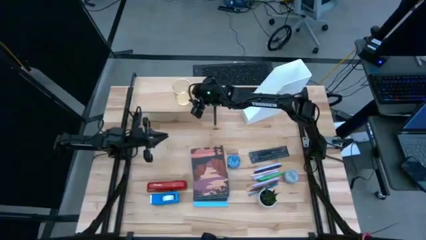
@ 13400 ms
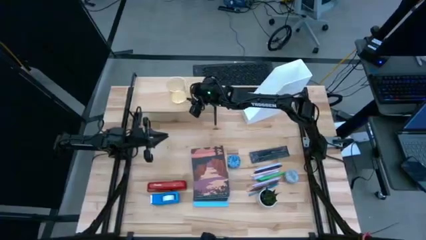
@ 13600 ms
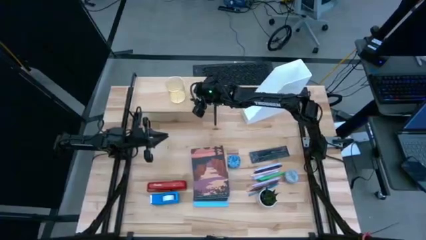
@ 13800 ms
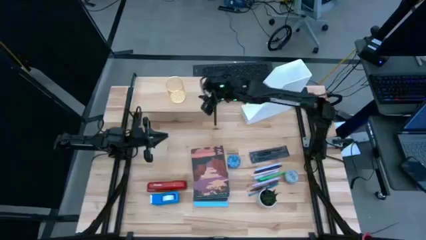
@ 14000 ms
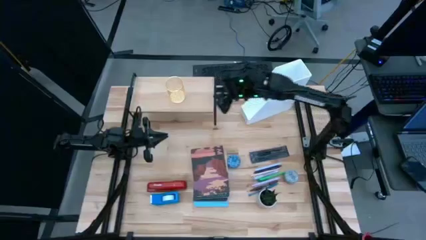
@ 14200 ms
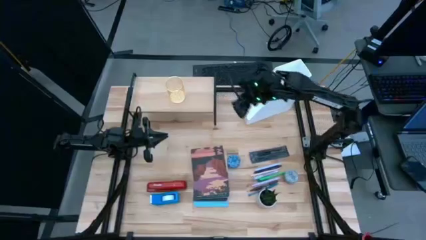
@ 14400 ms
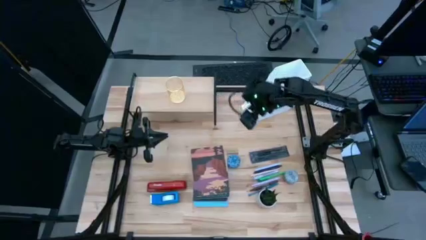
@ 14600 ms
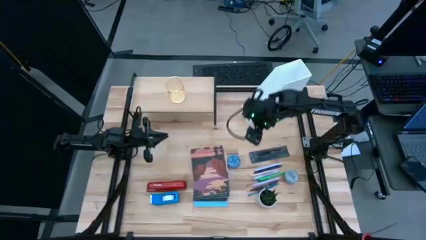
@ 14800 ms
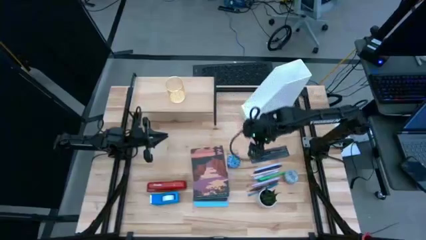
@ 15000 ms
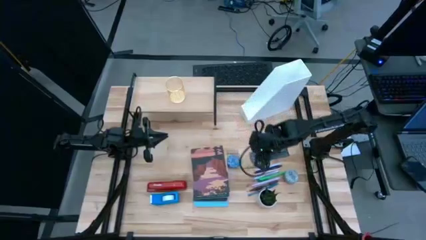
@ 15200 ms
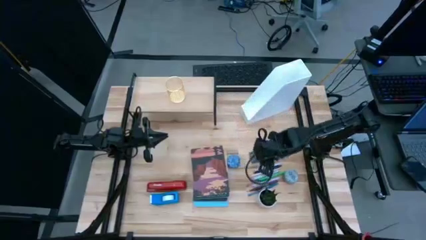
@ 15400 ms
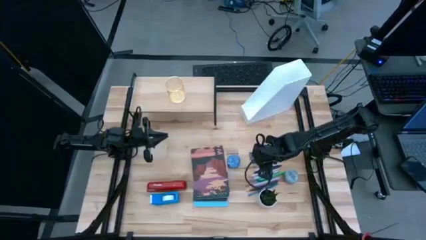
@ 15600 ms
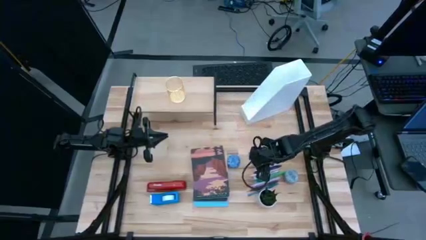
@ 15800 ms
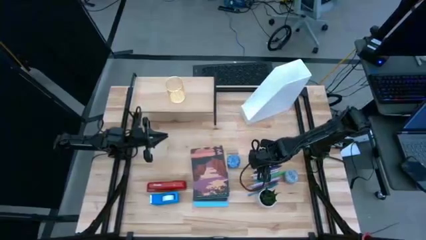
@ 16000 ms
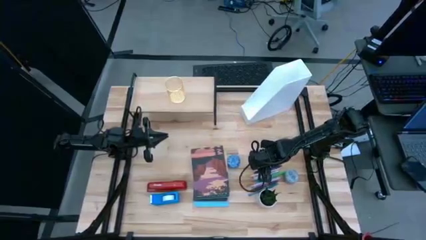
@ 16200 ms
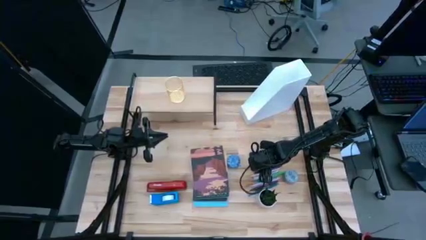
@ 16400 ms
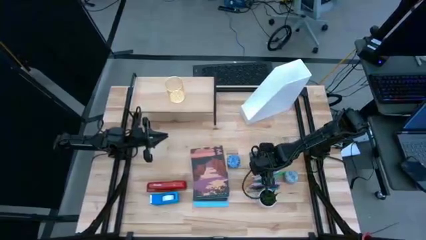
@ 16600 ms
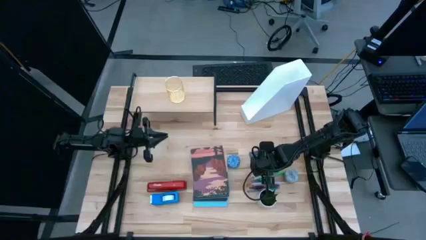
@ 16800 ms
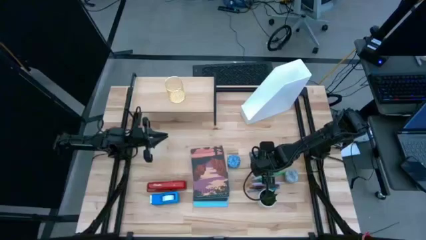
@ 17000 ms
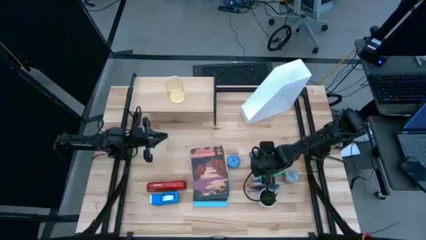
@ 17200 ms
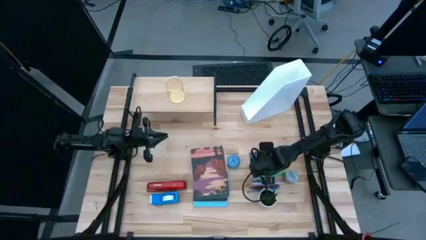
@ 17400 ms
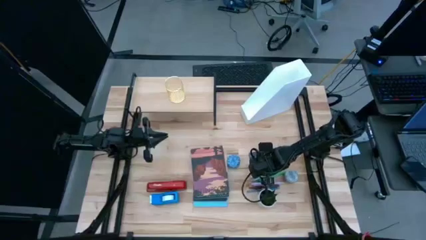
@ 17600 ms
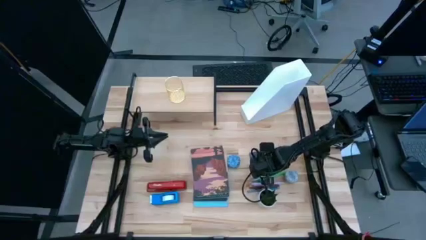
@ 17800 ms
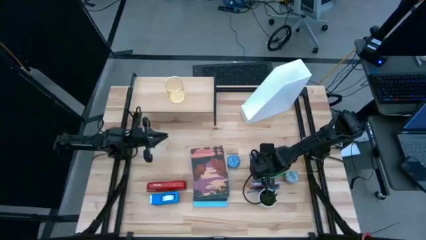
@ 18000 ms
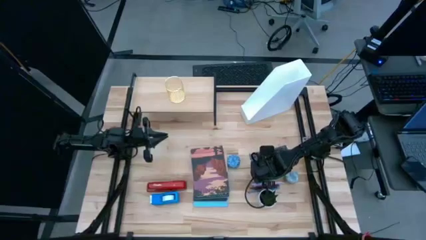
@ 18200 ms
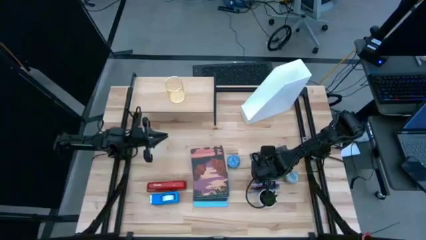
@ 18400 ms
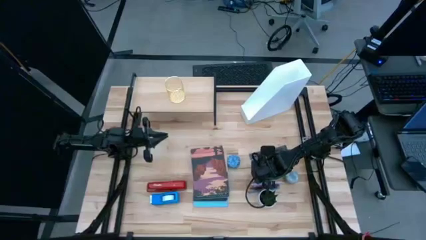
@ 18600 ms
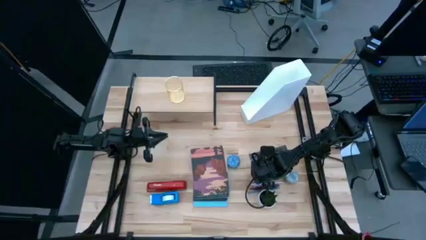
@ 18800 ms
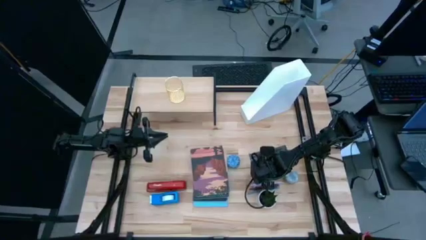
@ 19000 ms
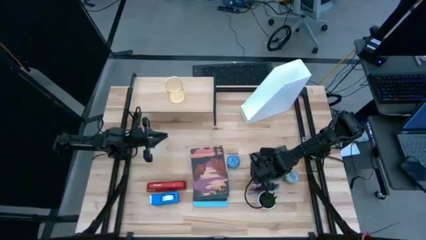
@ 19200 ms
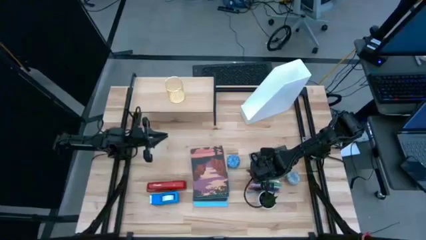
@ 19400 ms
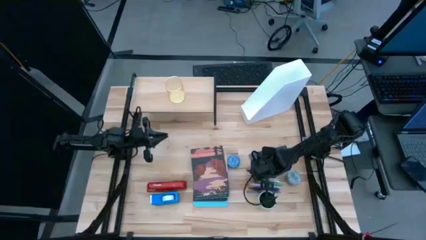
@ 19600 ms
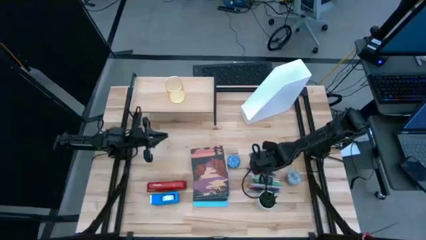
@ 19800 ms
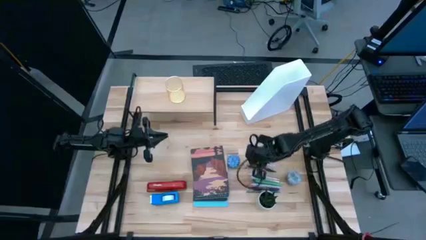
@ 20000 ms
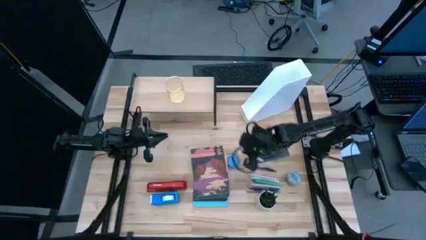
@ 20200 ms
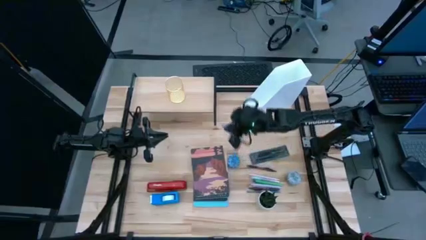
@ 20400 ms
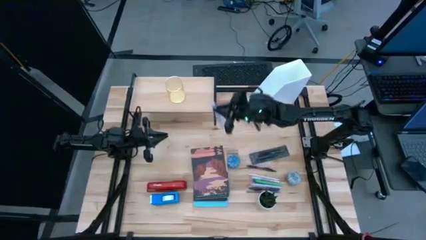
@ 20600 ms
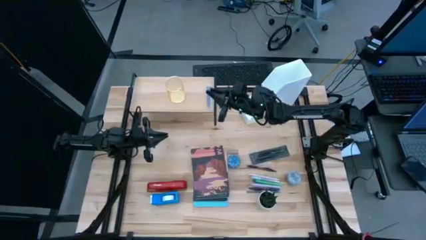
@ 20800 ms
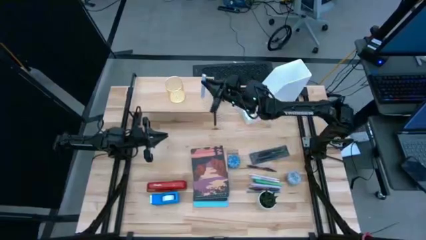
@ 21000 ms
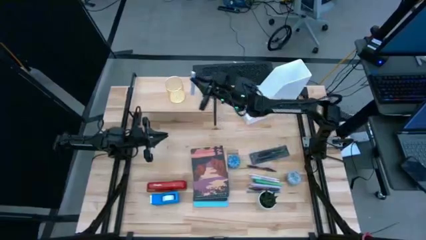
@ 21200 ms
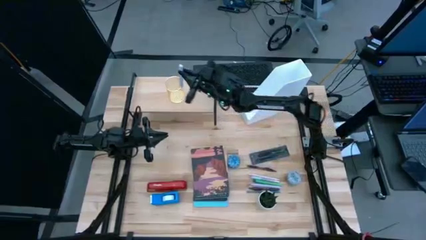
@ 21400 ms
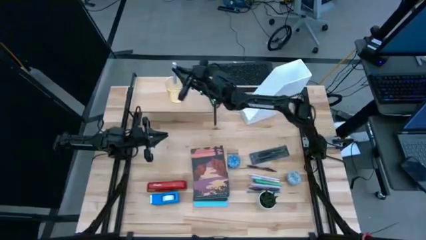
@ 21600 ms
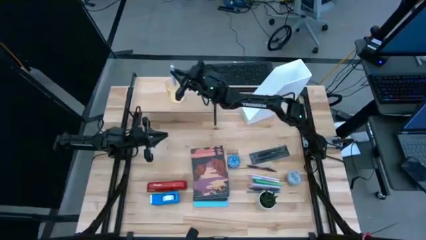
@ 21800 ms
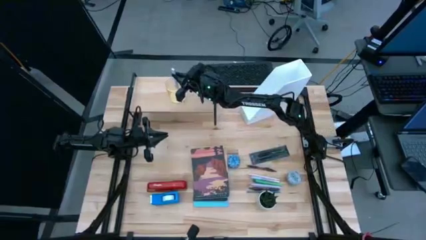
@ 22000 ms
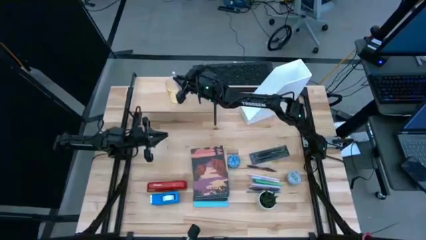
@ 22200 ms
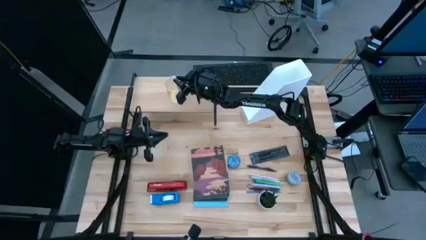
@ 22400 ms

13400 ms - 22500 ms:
Task: Stock shelves
Put the blue pen into the gold pen holder on the shelf

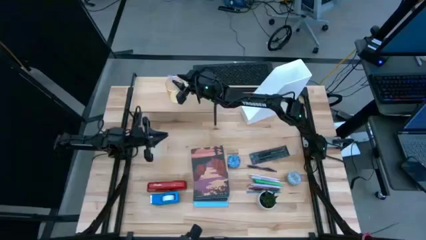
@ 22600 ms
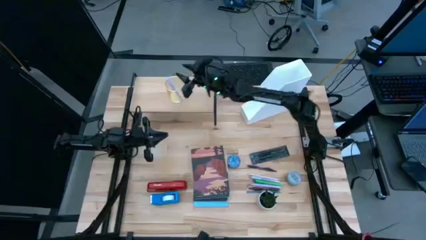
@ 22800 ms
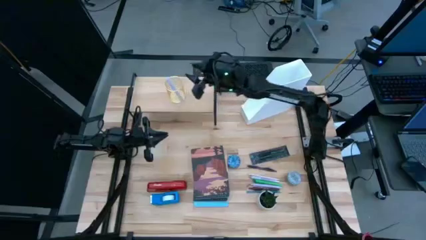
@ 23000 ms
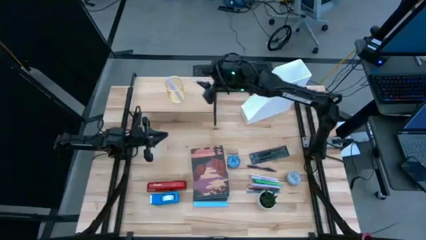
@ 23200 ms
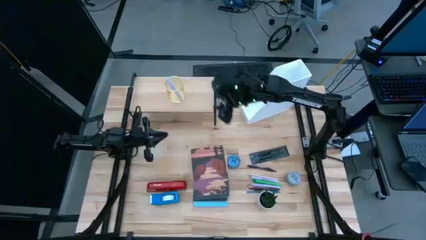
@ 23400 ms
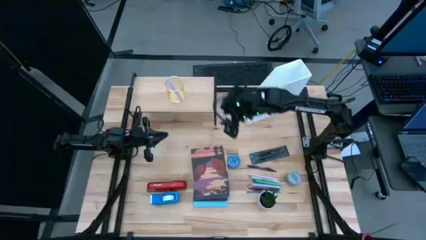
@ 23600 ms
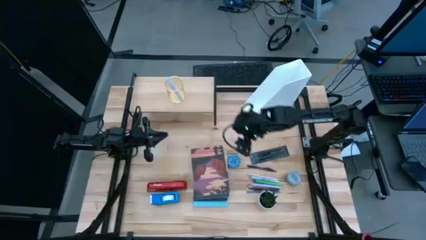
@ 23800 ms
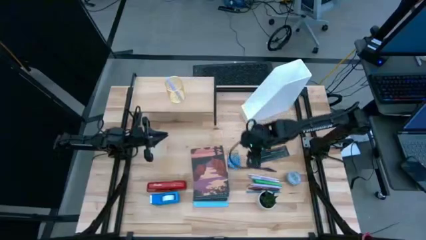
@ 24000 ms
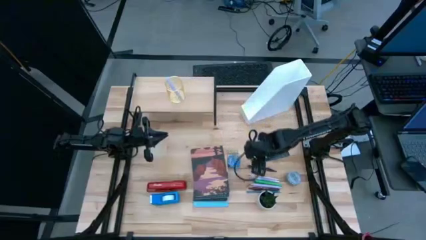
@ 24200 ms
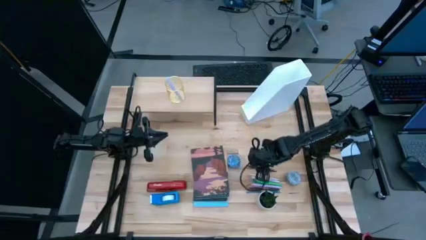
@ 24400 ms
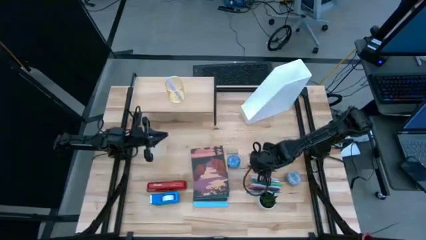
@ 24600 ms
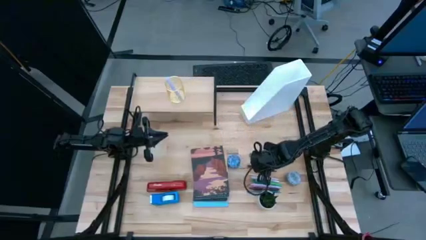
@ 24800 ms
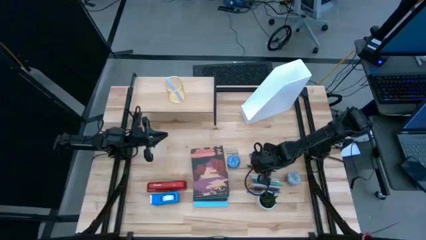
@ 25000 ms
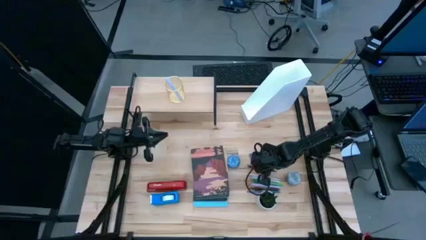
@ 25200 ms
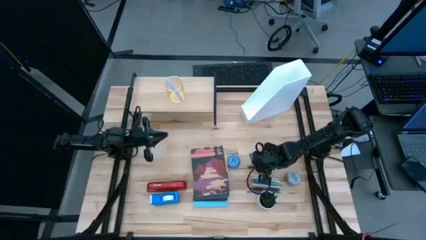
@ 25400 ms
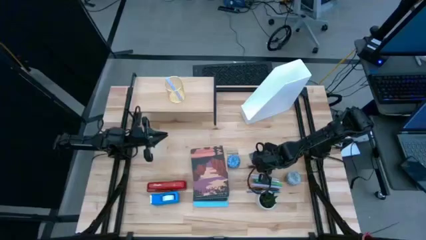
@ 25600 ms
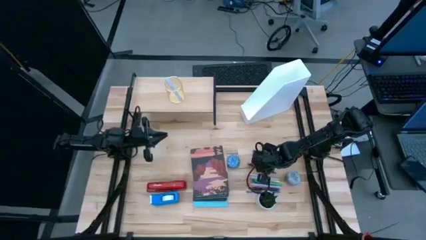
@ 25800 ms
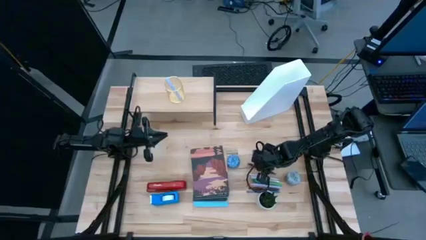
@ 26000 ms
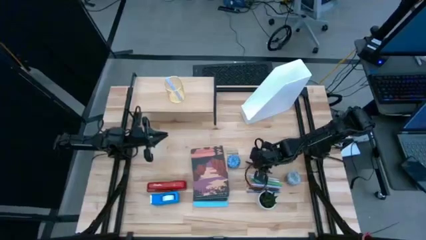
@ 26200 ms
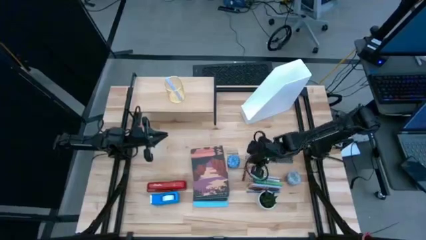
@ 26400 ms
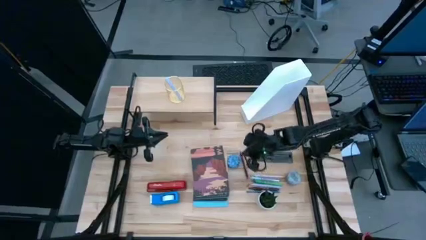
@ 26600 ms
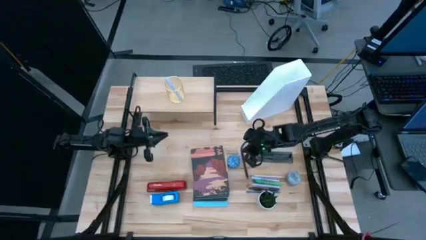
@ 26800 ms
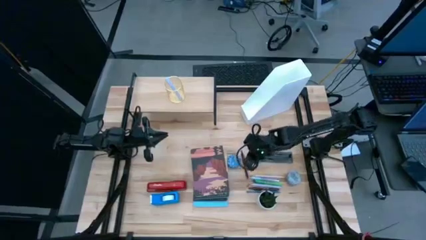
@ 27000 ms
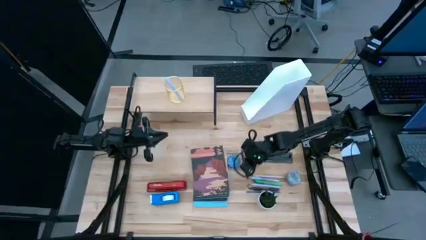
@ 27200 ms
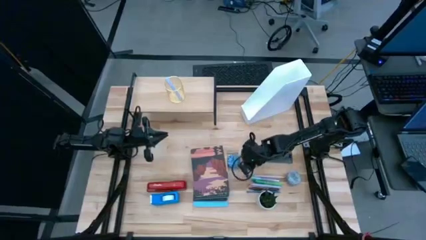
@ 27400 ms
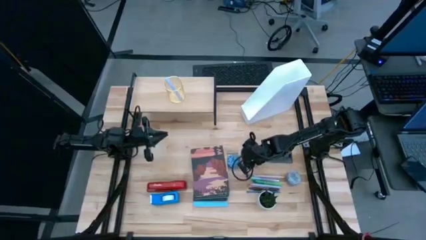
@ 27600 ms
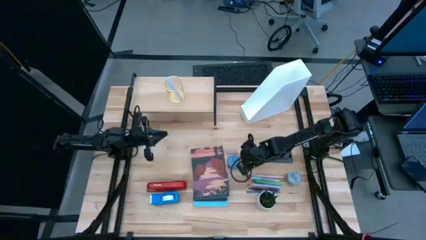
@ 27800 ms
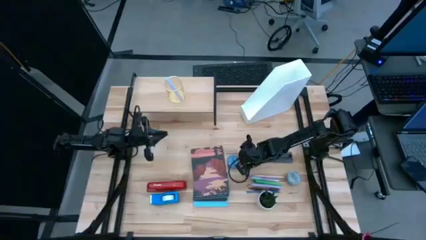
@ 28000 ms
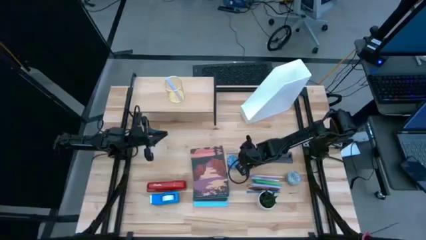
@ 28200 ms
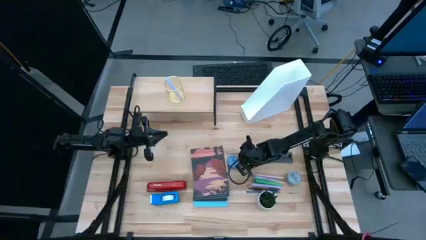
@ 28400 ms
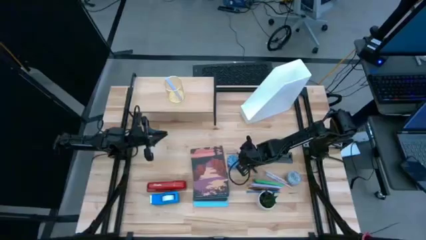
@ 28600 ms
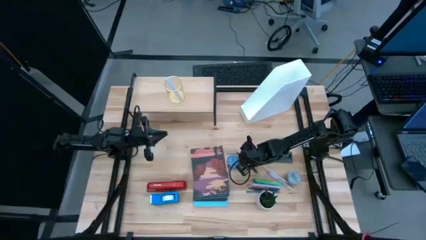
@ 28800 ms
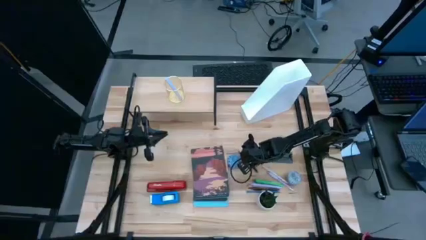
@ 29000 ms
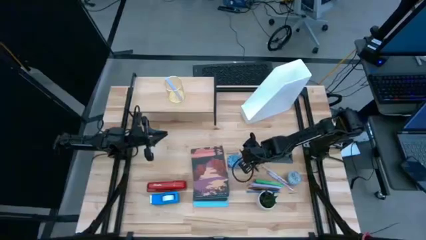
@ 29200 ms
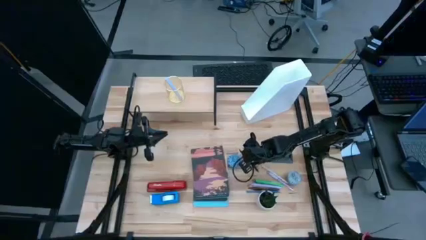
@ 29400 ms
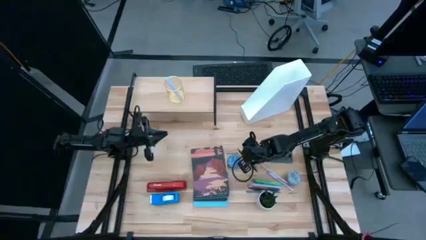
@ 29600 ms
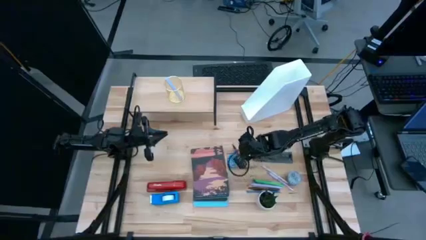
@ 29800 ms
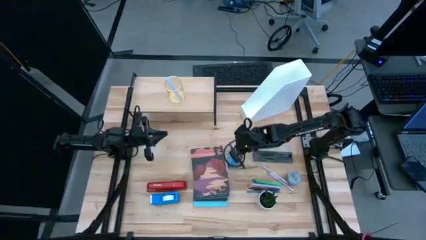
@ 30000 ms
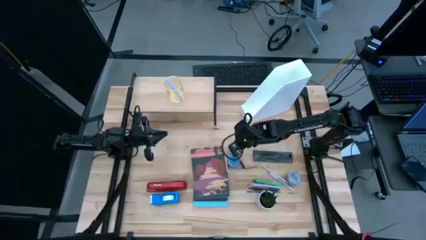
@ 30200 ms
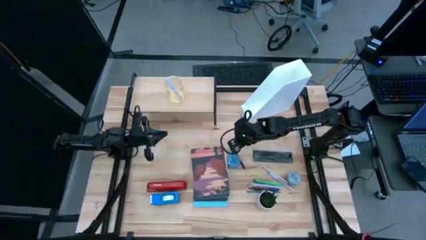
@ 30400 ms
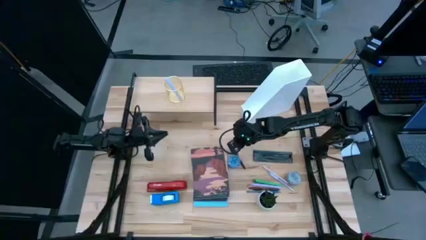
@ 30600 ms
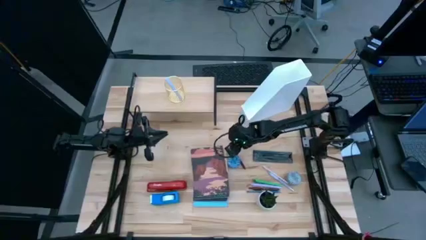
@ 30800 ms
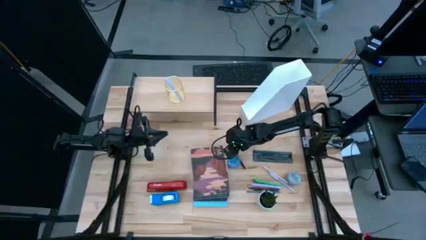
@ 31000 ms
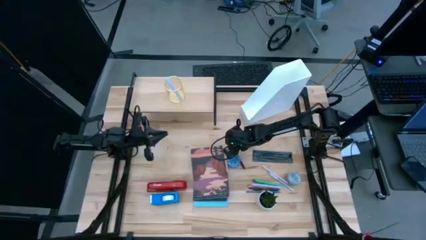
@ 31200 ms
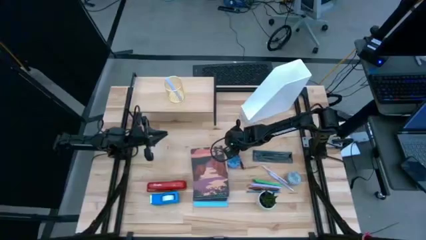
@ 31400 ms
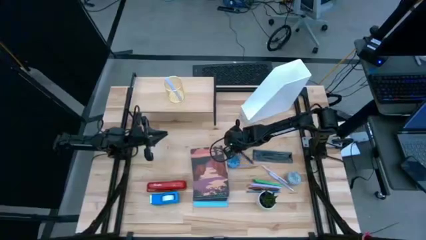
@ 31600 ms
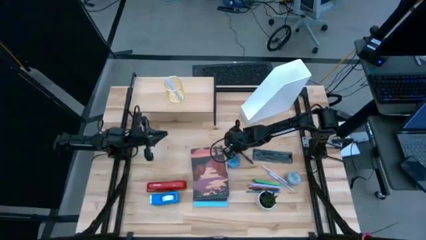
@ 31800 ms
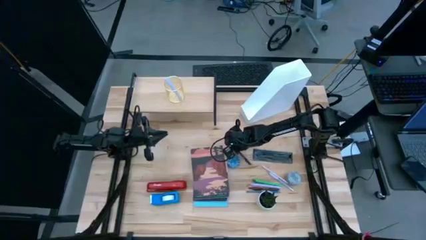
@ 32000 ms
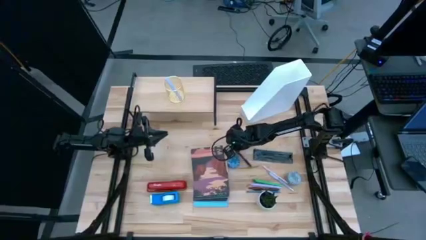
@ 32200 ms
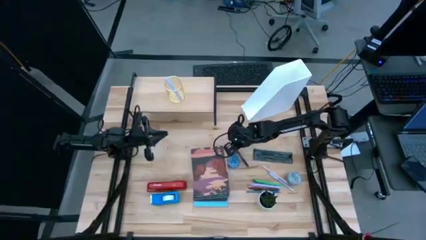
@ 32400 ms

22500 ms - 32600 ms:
Put the purple pen into the gold pen holder on the shelf
